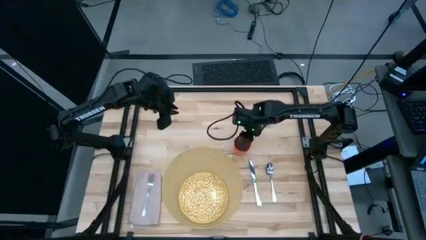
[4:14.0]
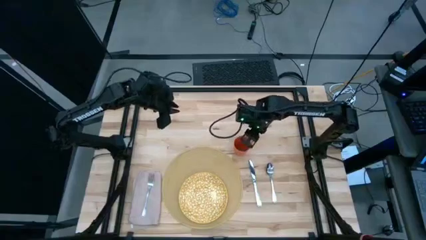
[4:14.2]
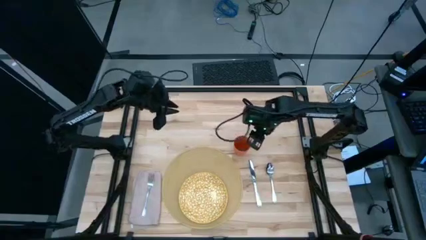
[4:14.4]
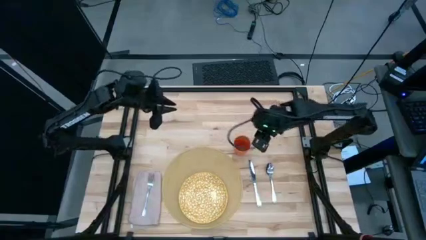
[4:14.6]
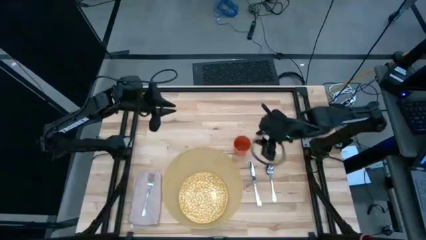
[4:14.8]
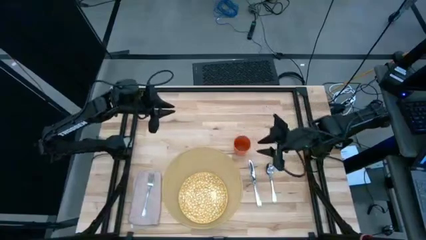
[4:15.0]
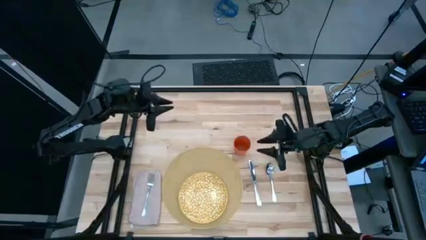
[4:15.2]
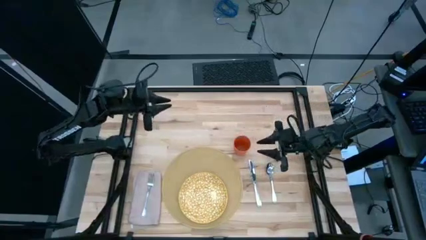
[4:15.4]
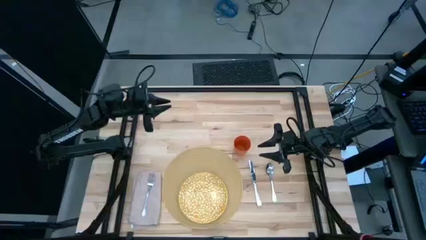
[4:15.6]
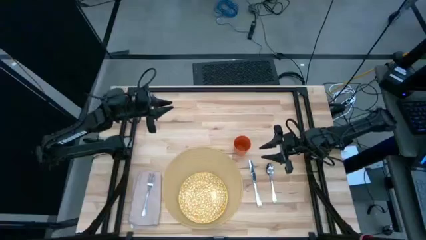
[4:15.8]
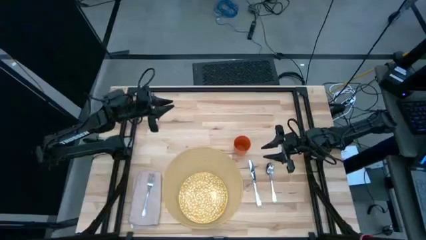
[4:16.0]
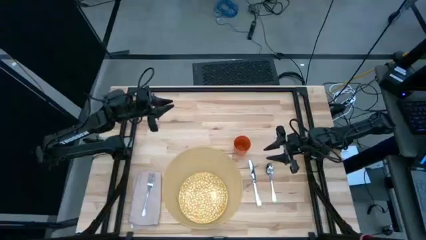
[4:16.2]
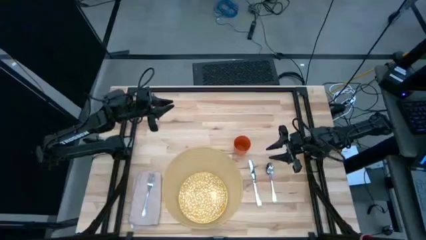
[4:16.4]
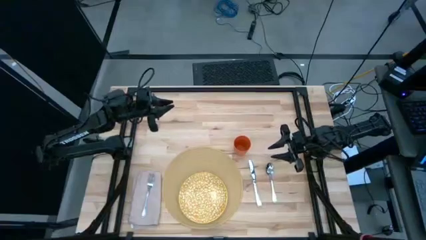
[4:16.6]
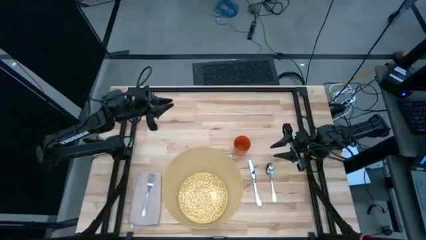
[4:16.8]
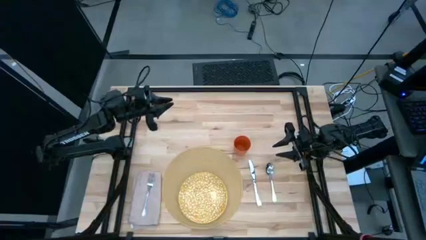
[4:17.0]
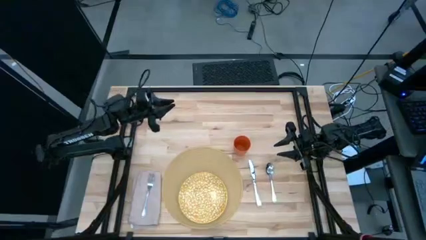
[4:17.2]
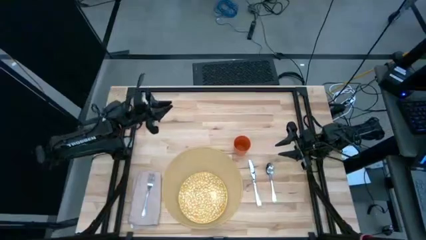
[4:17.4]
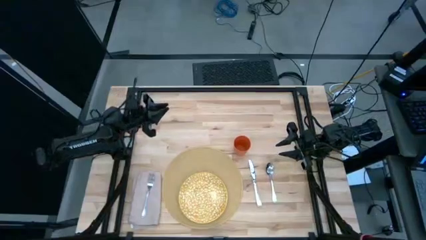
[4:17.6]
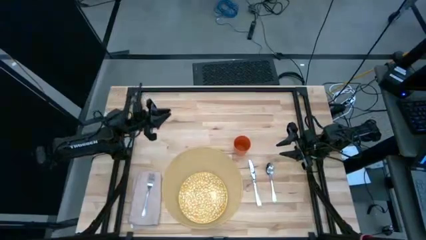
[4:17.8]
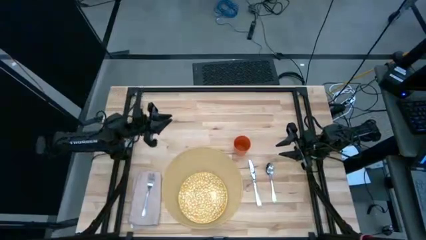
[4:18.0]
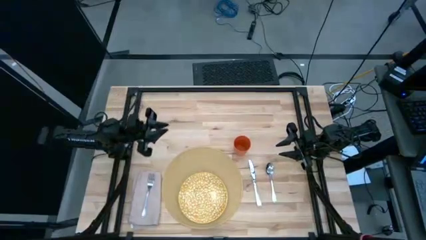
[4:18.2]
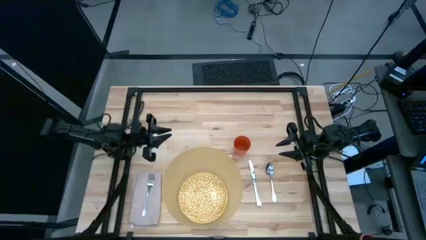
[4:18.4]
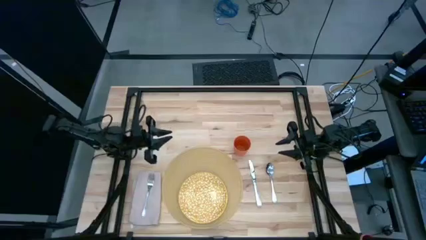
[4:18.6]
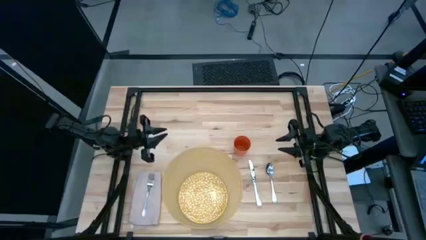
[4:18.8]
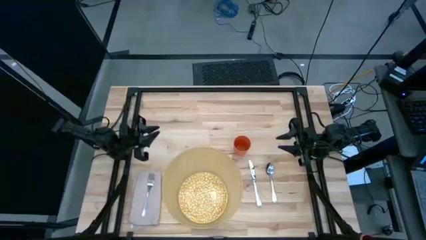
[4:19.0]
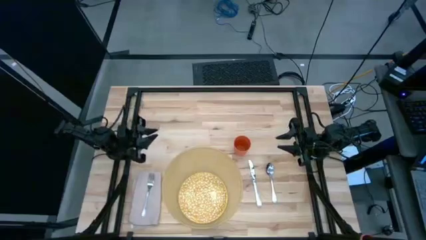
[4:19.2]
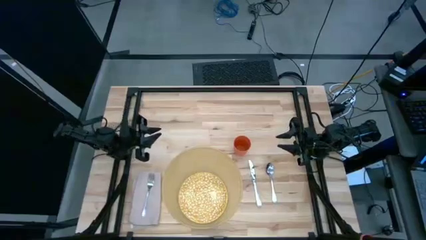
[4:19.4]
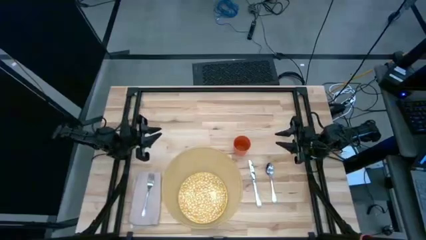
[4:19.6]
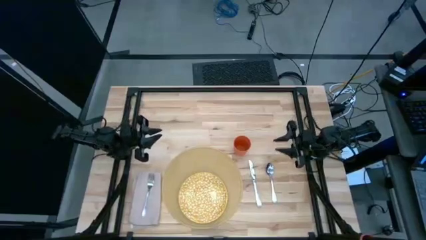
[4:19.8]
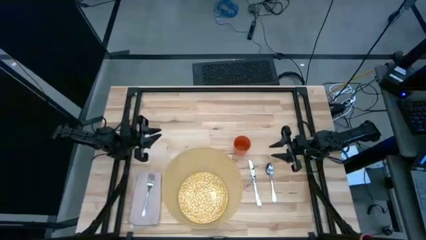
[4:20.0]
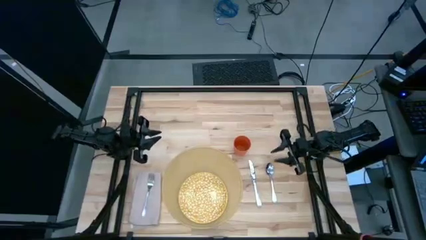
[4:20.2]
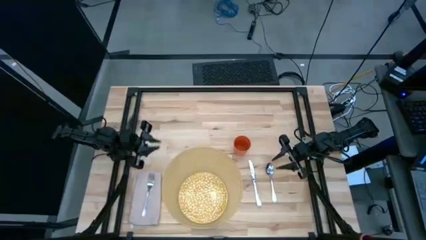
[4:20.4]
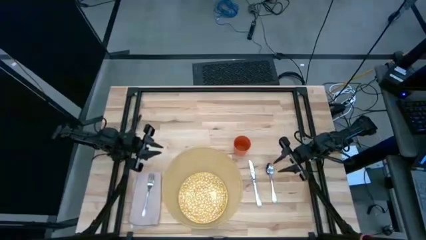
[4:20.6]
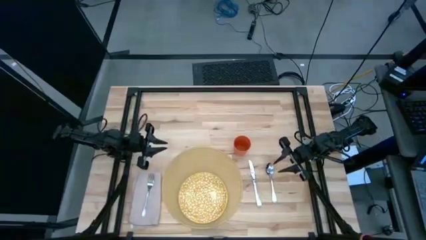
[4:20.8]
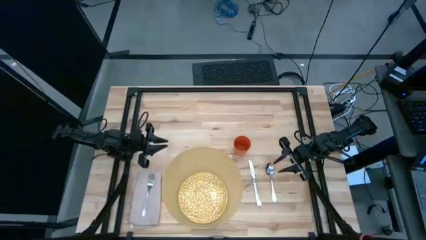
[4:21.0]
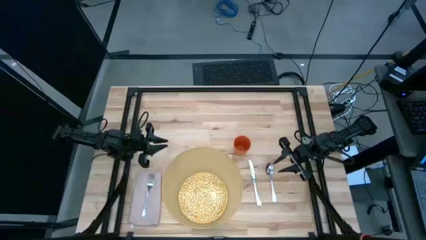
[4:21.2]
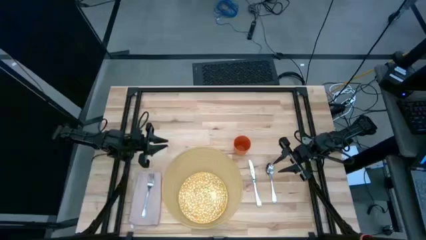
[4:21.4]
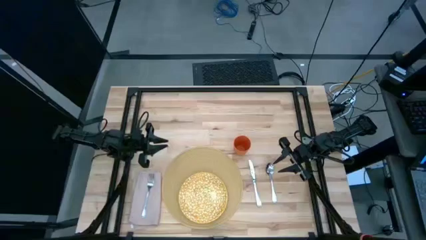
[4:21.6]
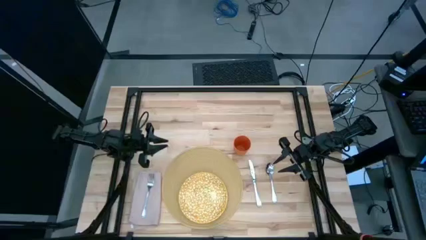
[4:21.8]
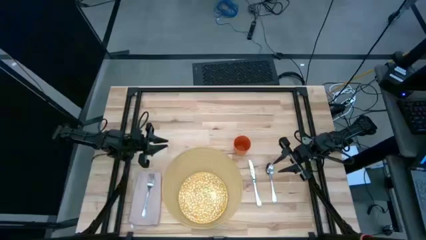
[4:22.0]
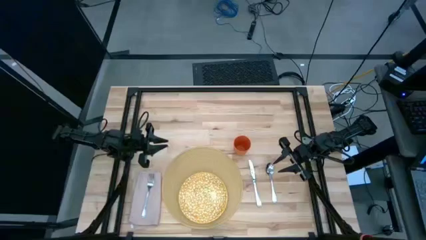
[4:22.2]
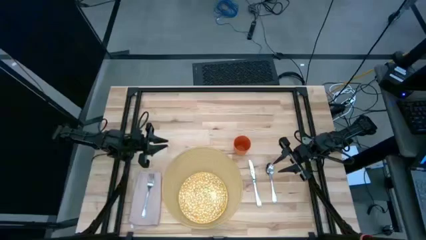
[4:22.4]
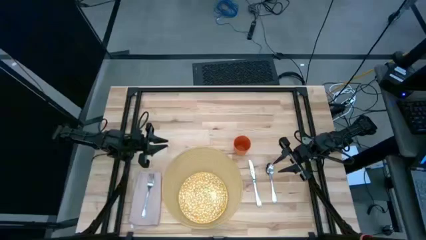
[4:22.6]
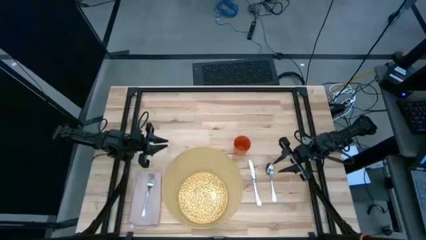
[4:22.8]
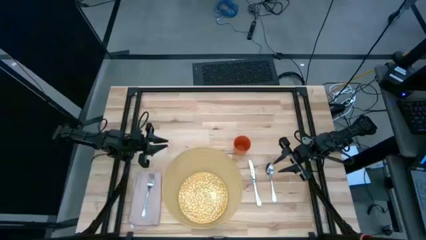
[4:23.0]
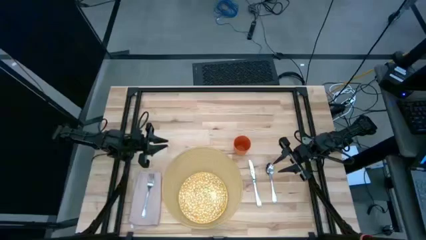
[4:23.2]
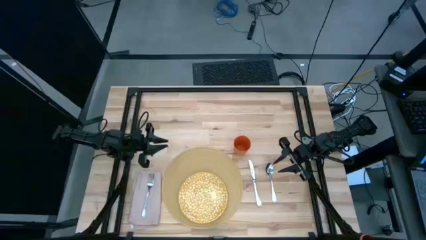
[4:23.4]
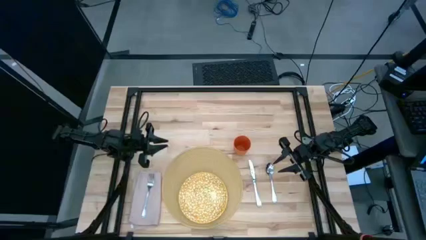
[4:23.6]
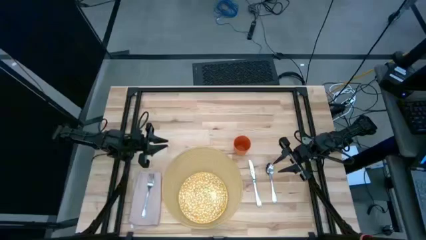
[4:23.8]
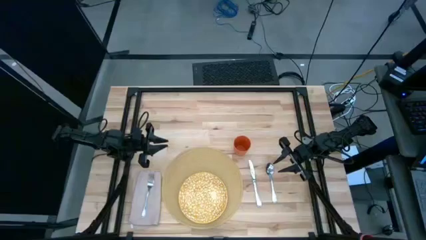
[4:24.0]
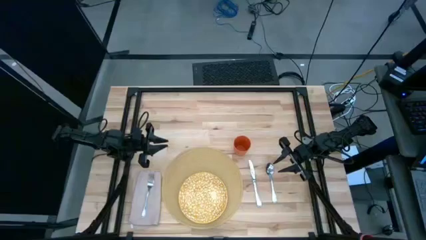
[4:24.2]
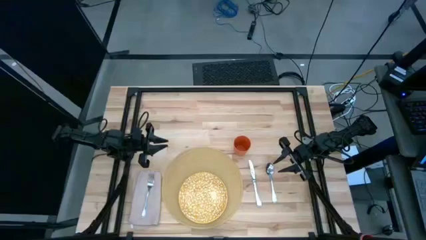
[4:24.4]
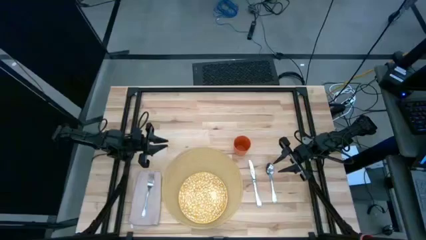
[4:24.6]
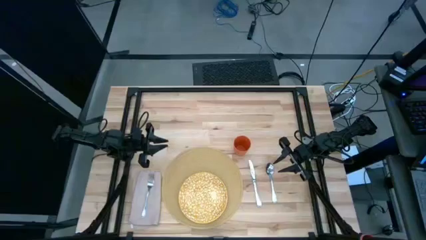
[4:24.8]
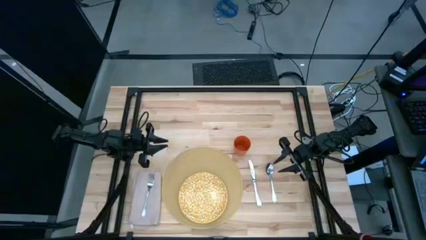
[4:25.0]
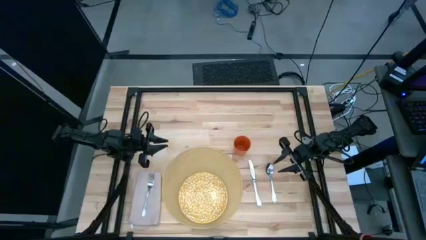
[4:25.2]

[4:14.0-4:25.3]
Task: Set table place
Return to Home Position
